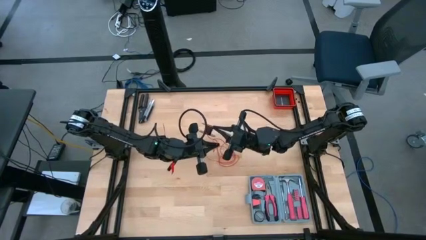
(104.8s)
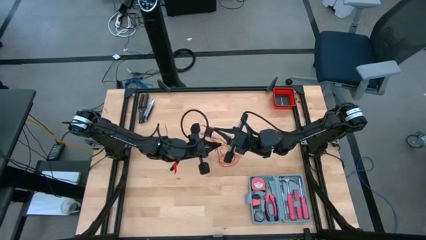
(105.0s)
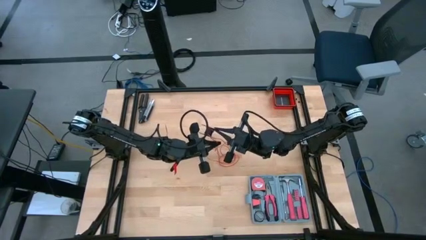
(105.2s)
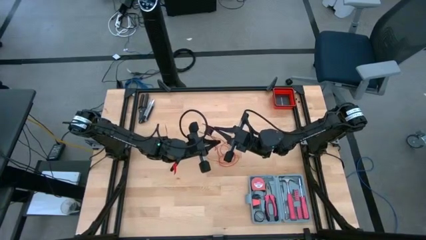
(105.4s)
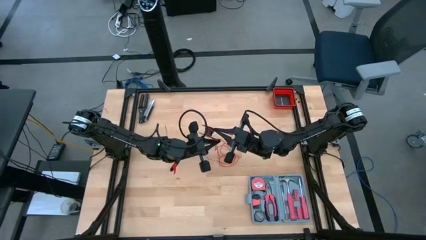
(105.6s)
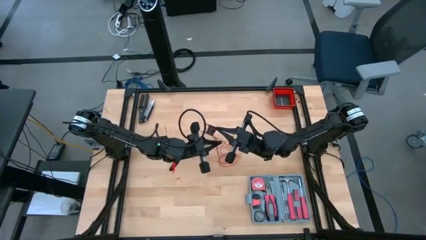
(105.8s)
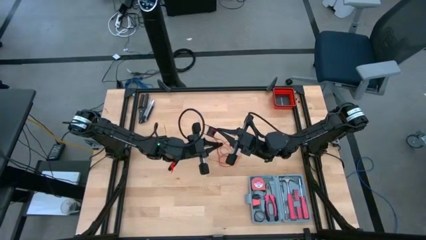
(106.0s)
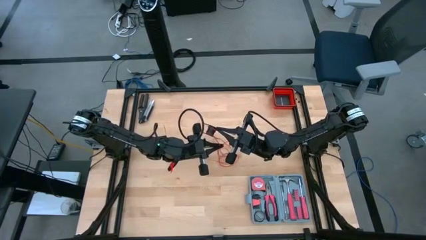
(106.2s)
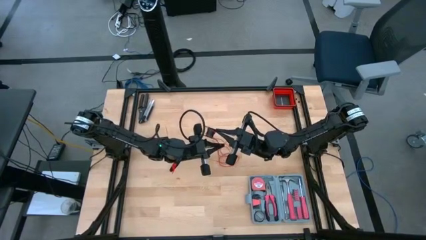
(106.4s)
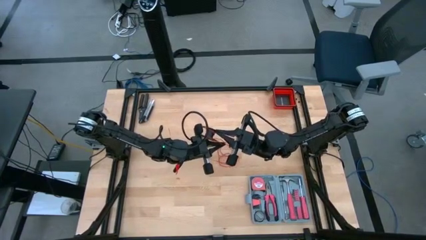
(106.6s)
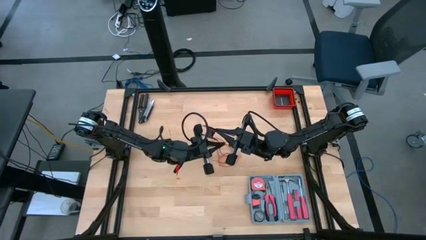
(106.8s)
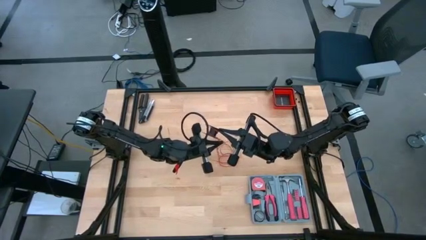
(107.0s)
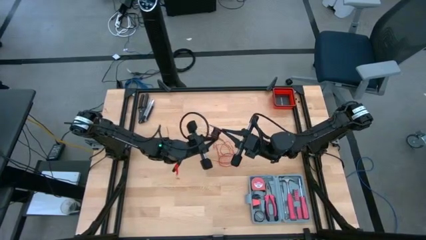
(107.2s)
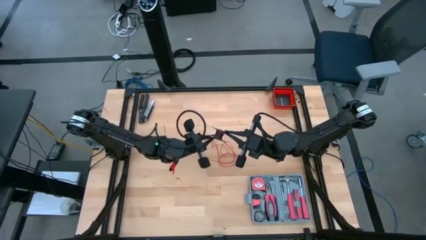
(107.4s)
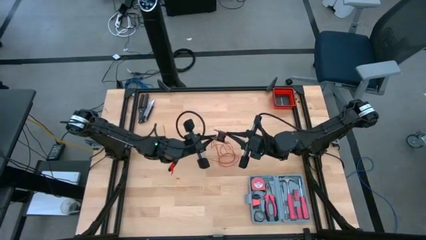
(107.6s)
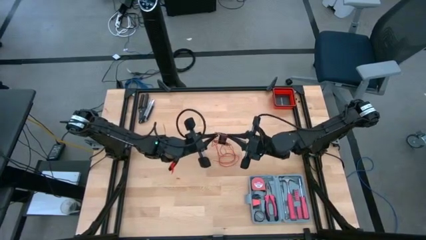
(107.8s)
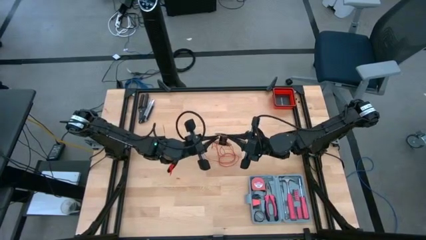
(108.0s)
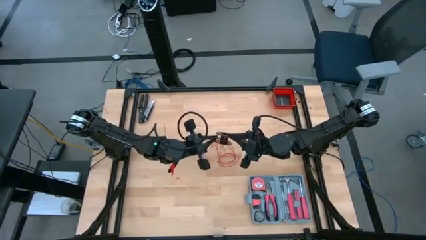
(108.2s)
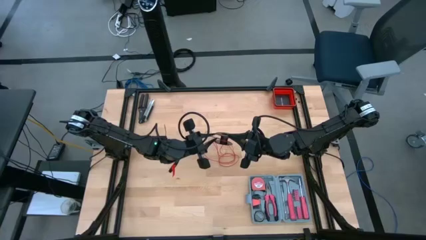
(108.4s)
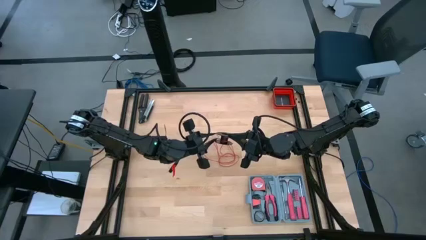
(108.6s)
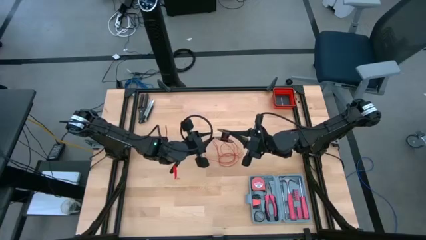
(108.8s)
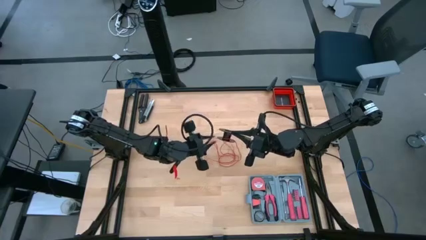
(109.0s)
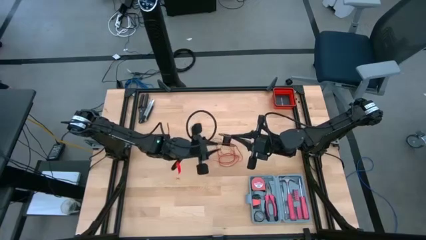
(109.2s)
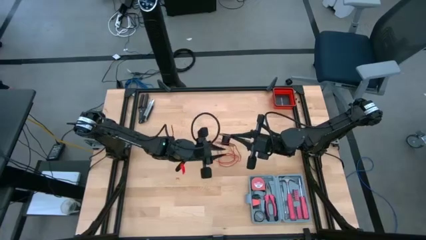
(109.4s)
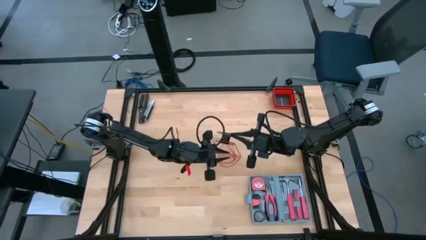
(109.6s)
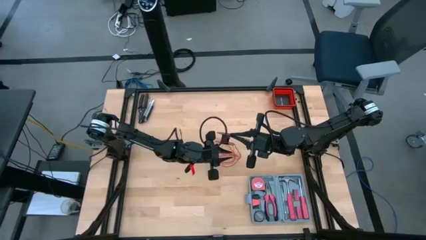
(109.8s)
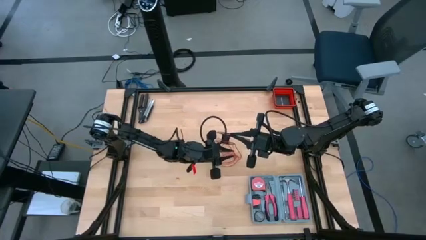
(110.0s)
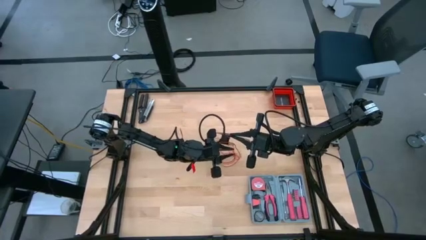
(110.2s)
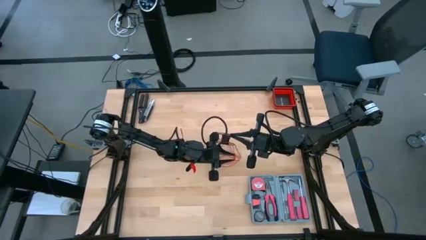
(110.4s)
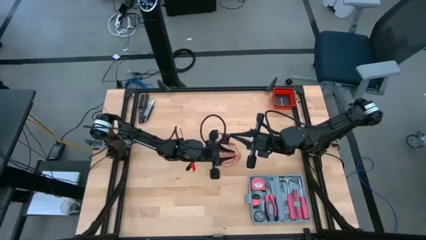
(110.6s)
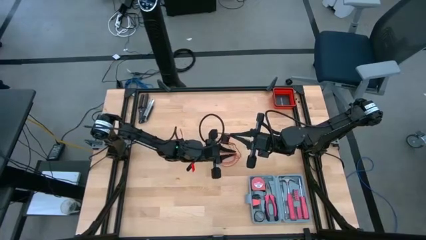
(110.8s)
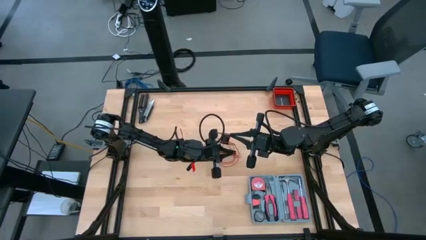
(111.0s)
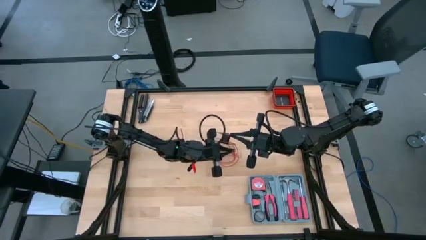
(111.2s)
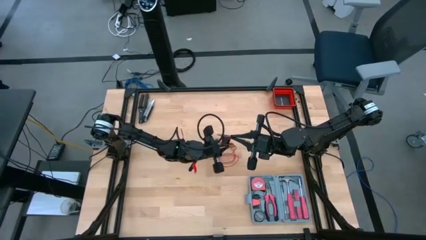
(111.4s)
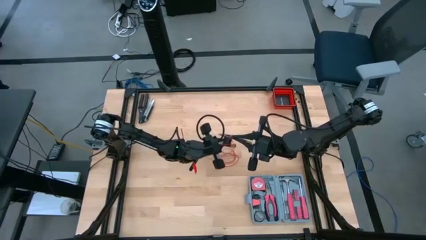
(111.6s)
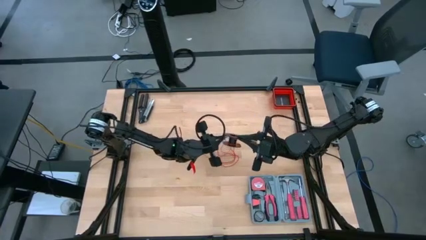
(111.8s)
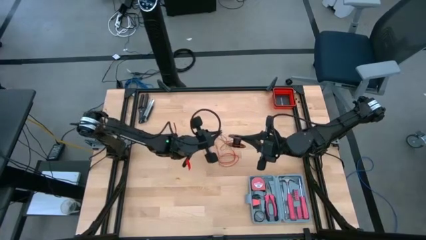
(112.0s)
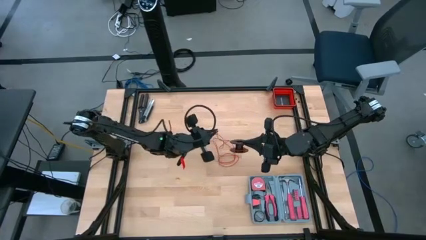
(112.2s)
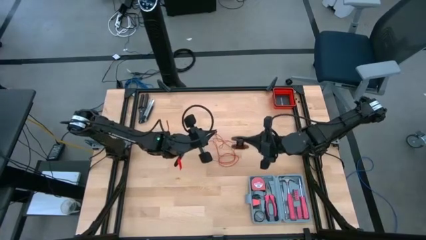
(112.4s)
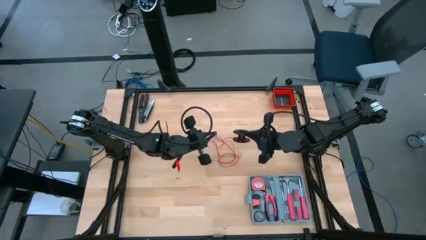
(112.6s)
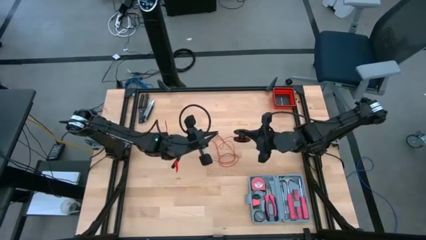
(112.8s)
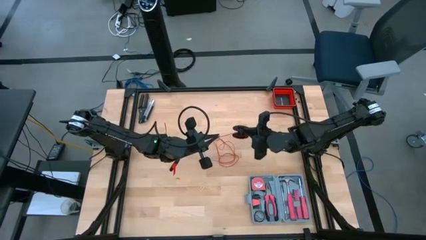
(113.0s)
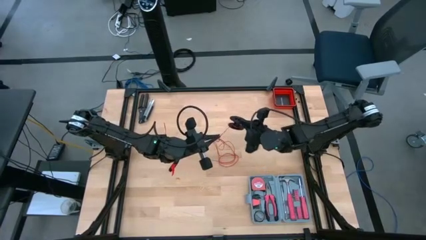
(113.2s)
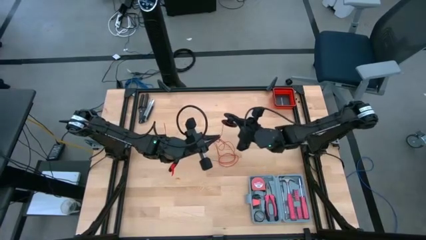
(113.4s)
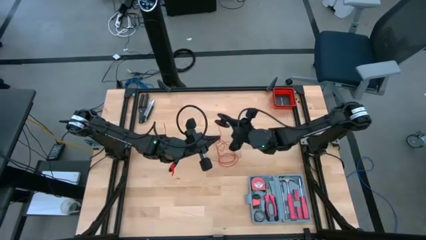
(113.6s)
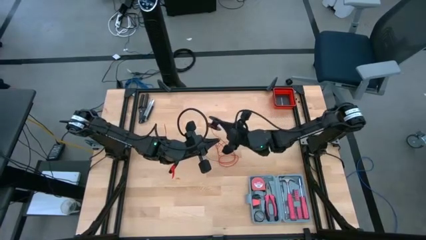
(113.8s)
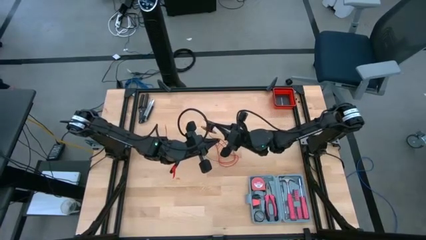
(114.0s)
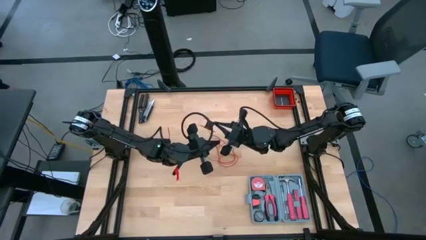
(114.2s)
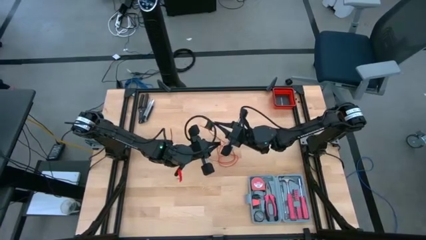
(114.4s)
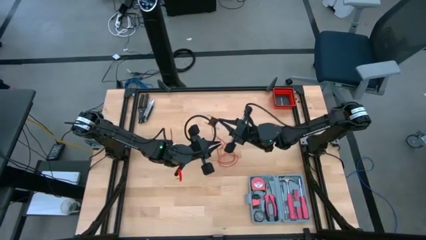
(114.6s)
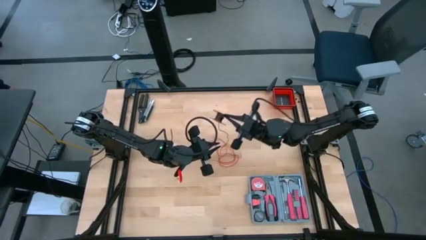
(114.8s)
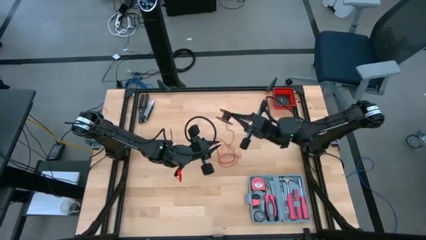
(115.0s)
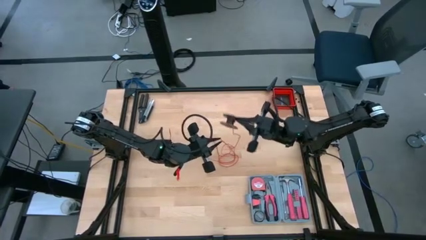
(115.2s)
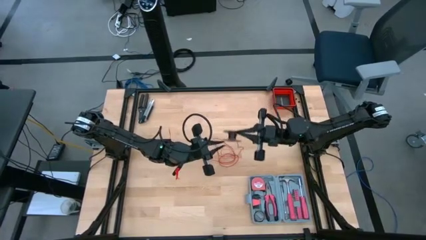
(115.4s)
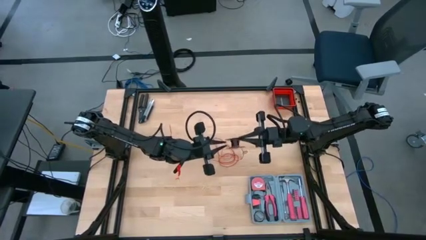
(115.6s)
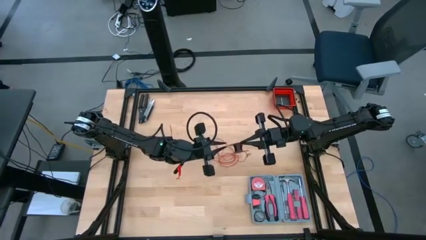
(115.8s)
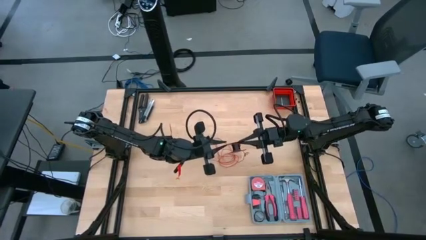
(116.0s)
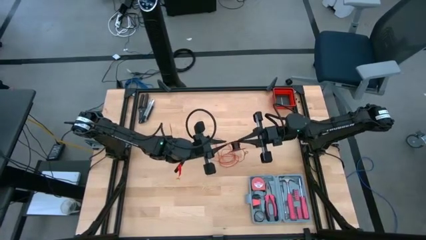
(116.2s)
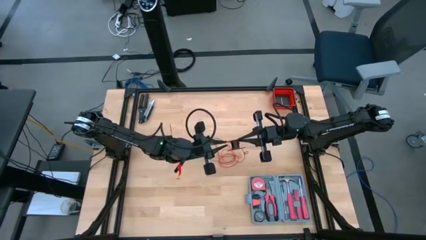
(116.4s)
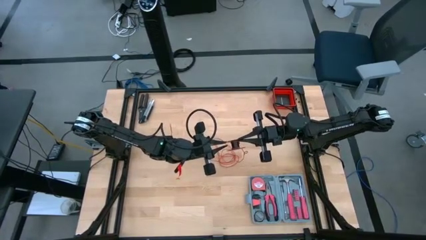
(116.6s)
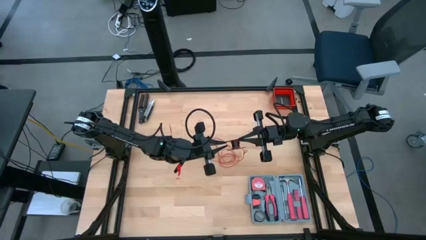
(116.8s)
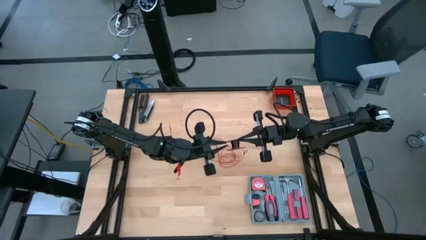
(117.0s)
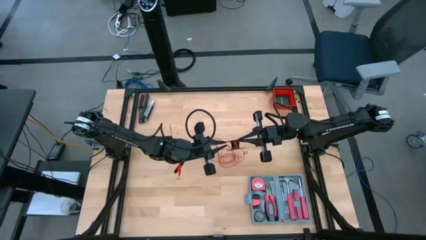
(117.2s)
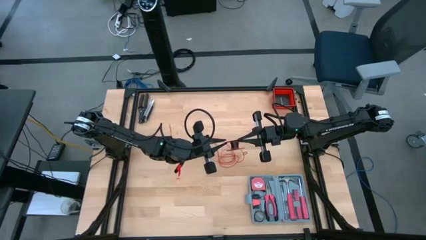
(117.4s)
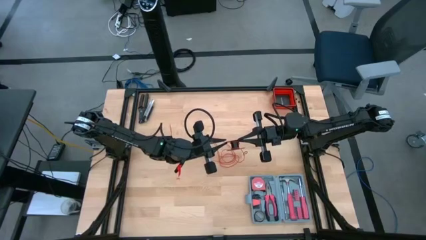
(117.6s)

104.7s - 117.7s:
Task: Coil cords
Coil the wire
